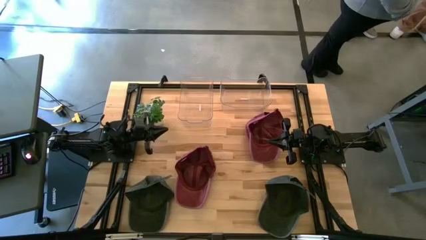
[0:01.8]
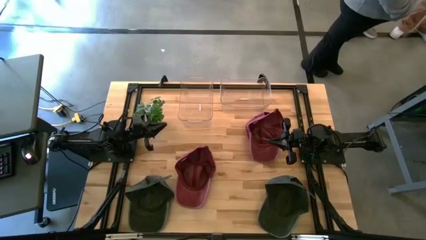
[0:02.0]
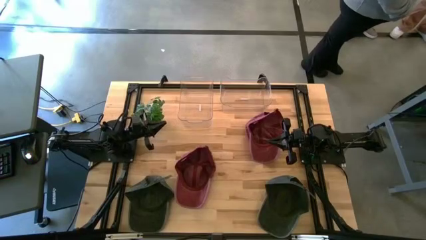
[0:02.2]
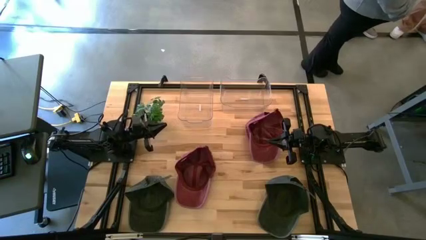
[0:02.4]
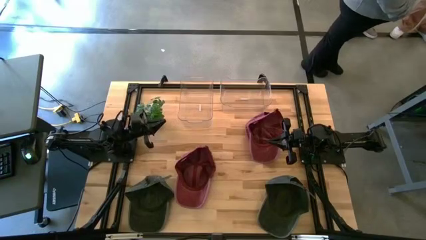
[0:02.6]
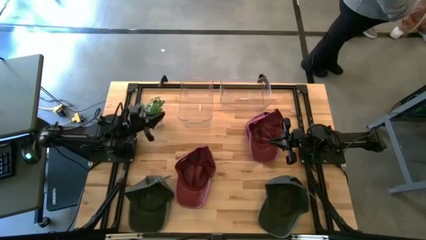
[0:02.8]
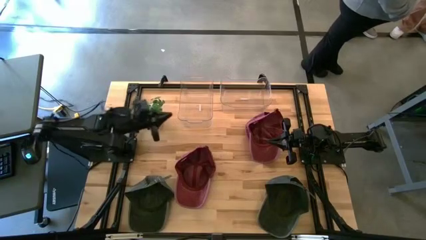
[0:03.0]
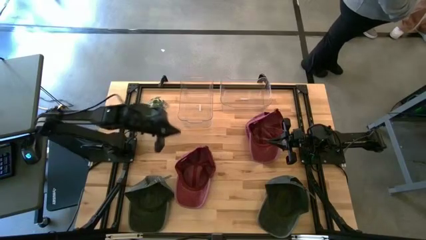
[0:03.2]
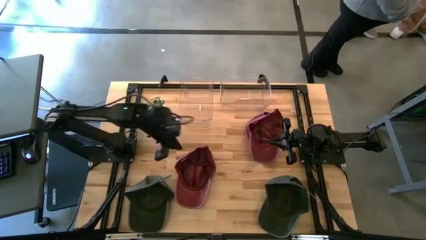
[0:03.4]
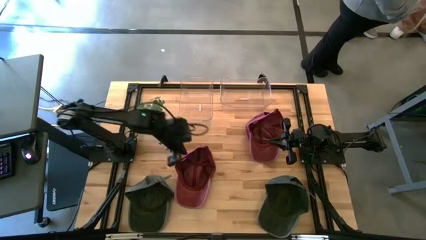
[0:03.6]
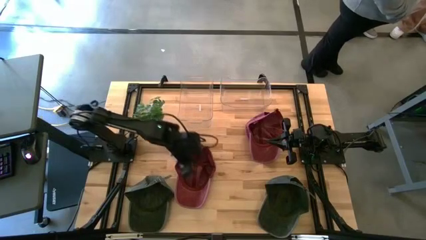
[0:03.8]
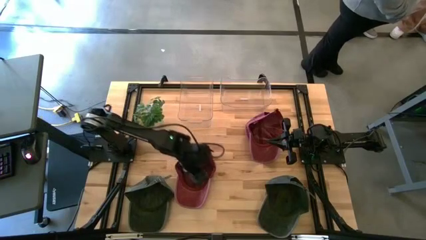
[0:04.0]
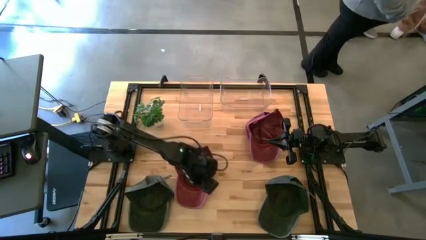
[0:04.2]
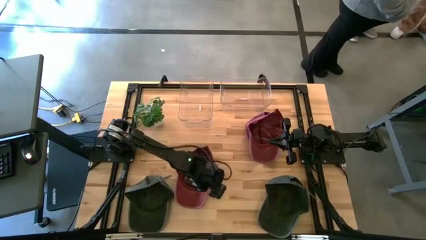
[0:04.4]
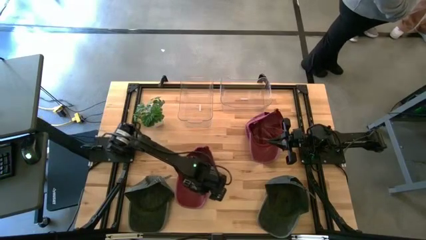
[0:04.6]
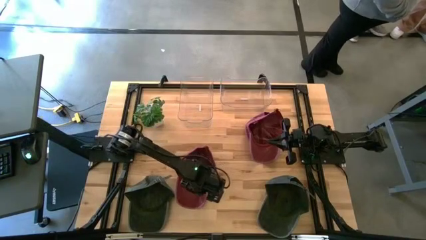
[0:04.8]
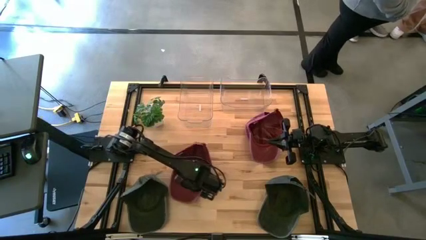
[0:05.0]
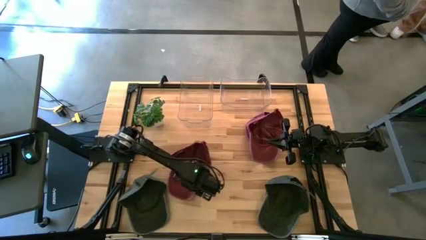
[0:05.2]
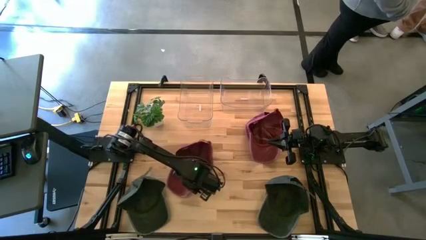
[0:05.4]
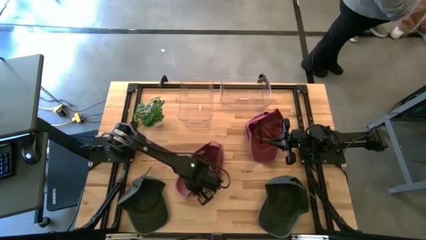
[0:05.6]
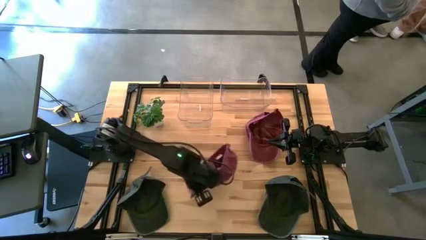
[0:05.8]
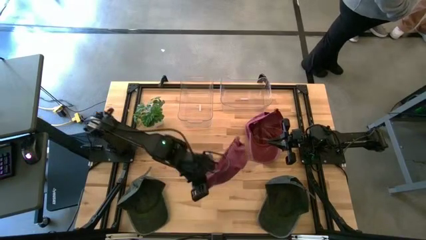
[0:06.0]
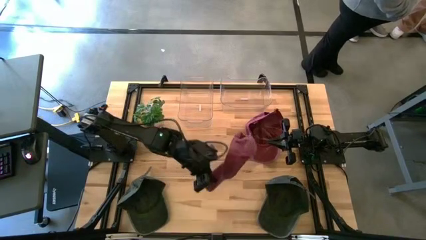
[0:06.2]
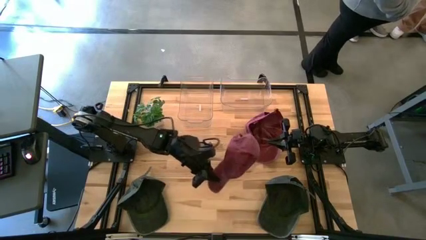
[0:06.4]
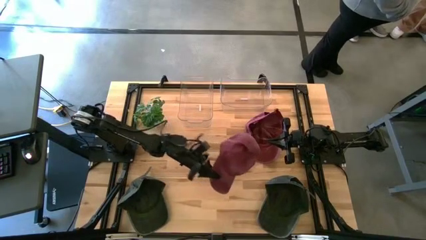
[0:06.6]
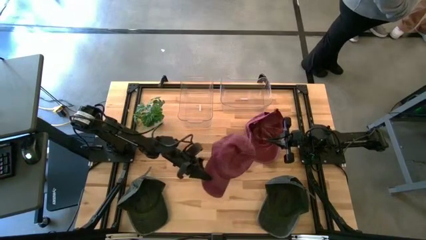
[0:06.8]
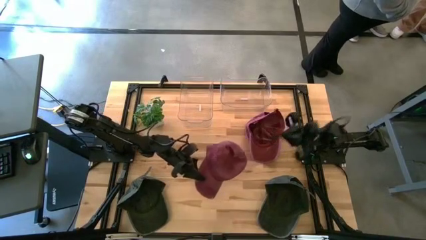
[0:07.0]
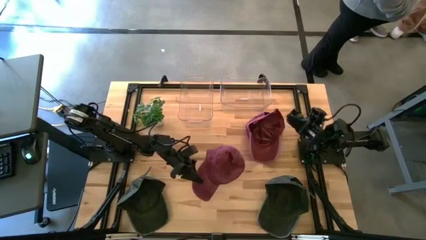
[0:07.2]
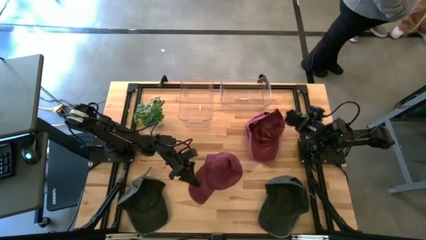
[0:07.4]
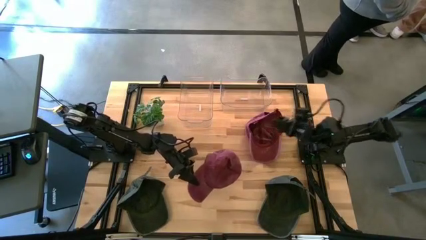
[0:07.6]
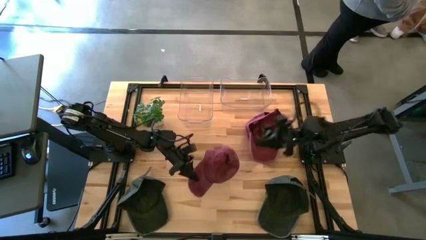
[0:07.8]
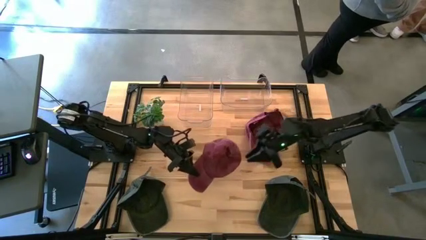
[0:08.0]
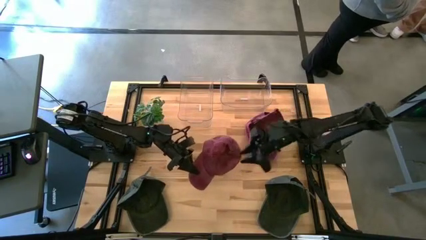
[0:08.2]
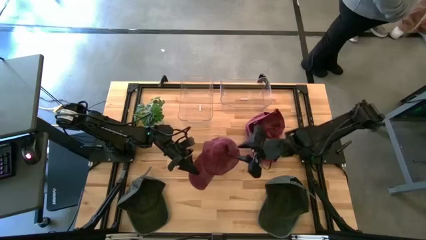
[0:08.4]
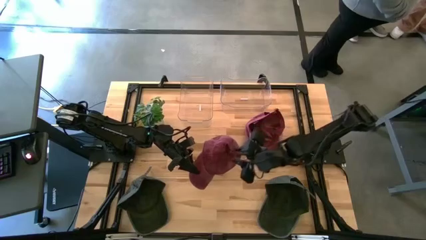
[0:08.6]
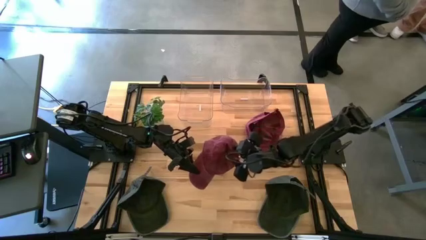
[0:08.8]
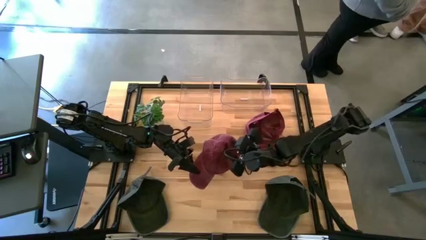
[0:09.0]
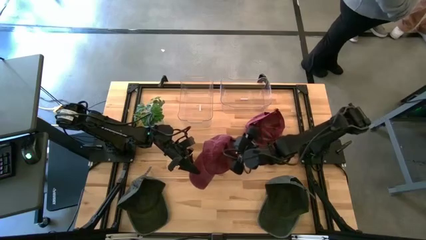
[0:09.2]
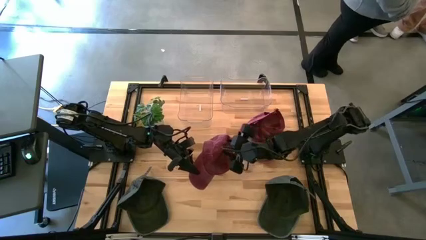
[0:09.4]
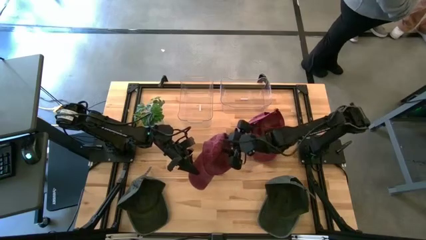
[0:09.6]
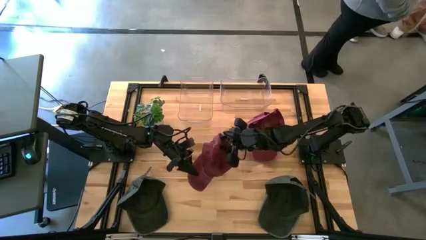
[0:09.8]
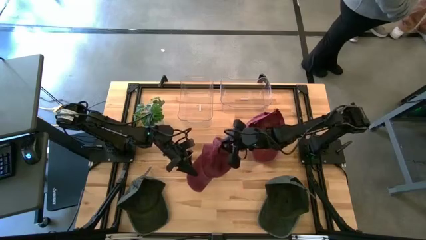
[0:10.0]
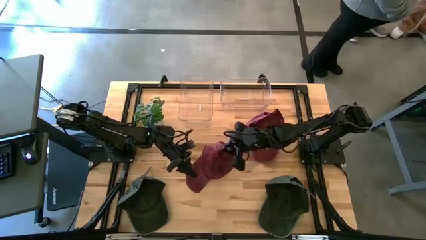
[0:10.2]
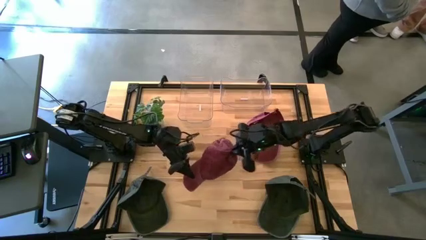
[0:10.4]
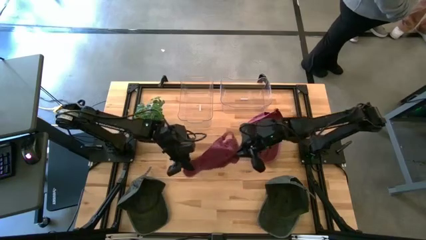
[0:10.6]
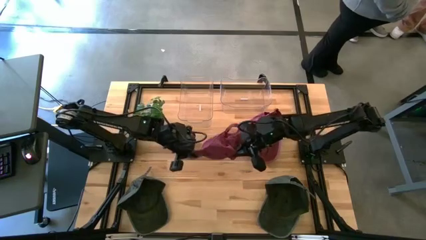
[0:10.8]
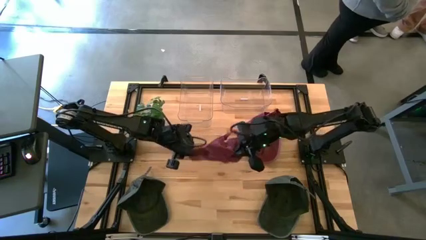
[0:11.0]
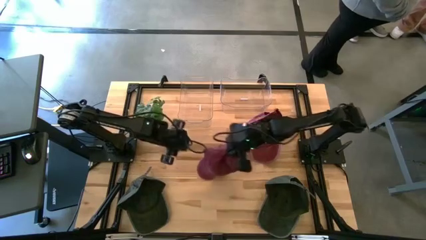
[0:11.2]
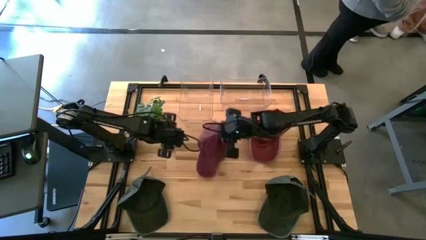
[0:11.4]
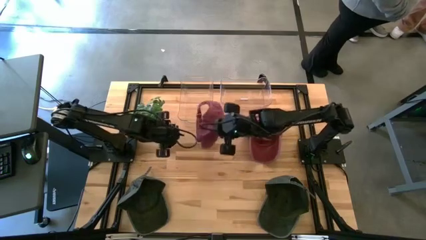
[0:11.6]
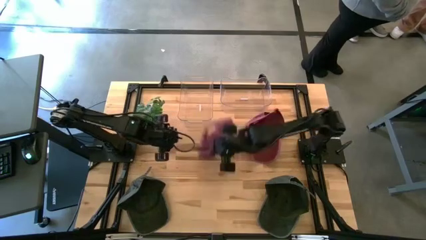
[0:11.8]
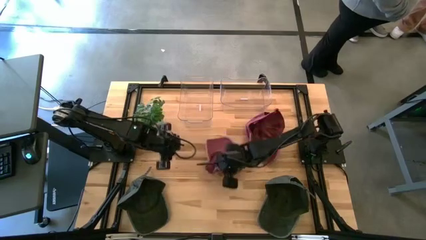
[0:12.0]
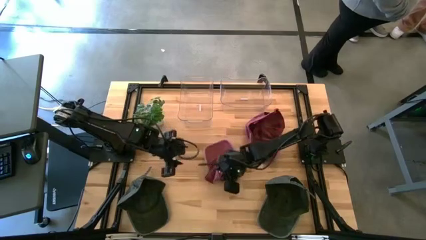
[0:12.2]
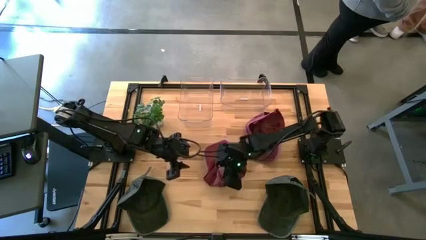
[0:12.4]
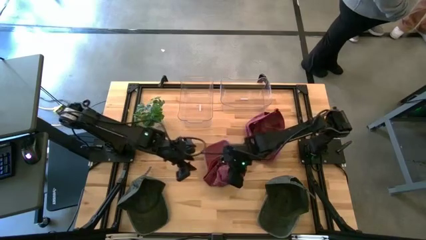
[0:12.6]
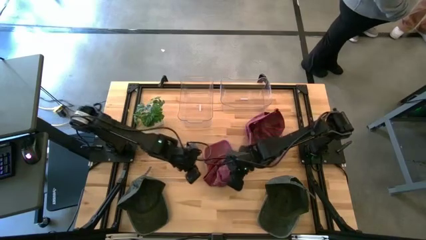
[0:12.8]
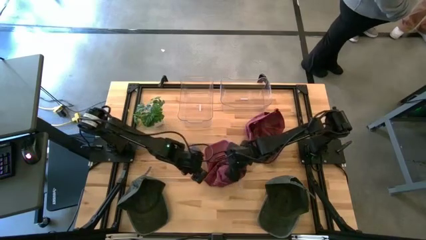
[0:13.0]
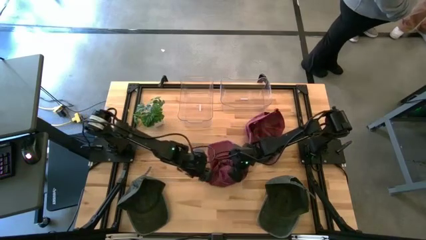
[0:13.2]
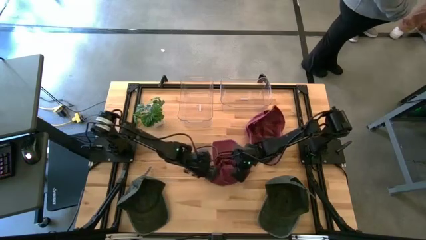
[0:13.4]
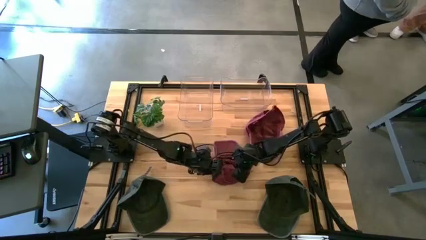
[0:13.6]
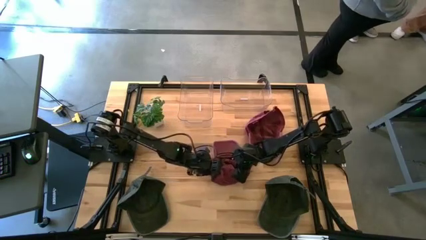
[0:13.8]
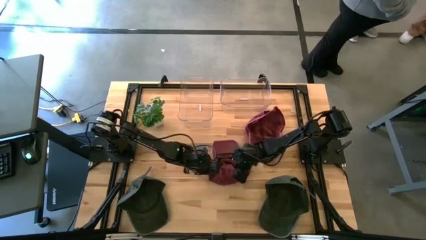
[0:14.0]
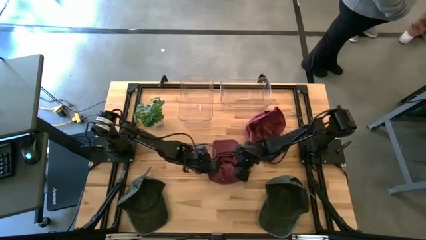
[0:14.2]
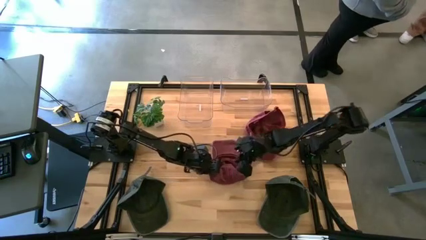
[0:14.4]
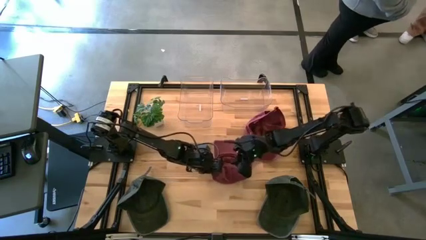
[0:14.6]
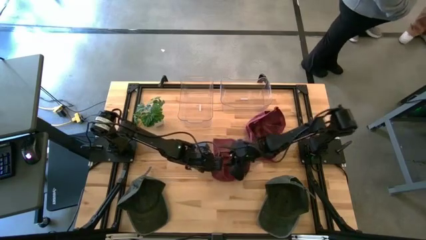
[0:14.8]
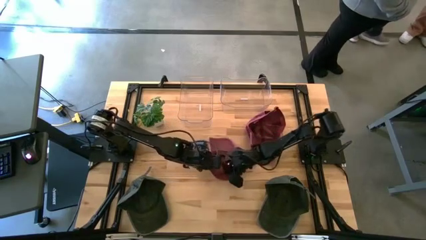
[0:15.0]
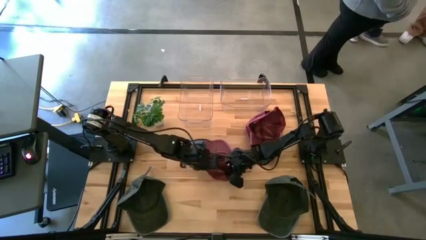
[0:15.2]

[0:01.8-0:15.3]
Task: Pick & Place hat
Put the left red cap into the right transparent bin
